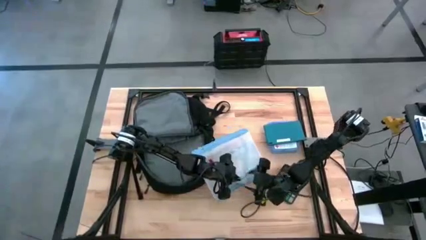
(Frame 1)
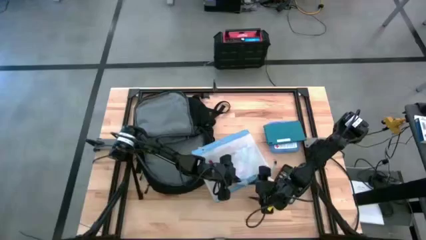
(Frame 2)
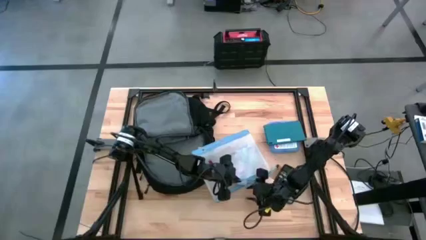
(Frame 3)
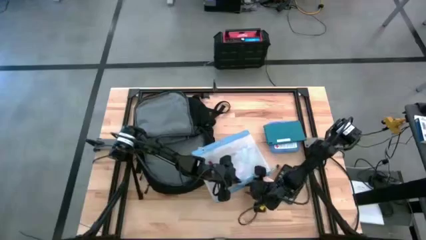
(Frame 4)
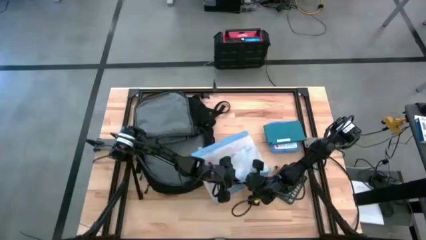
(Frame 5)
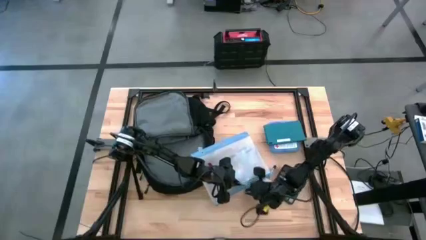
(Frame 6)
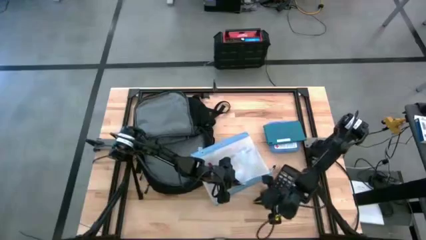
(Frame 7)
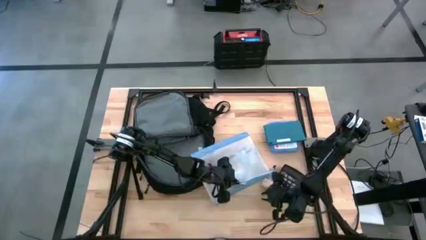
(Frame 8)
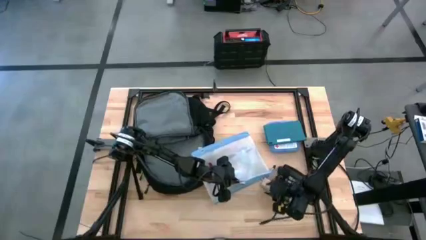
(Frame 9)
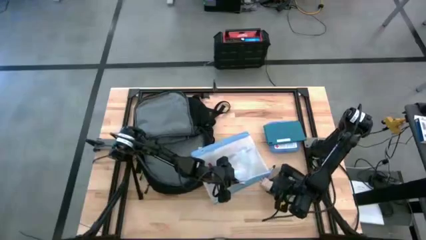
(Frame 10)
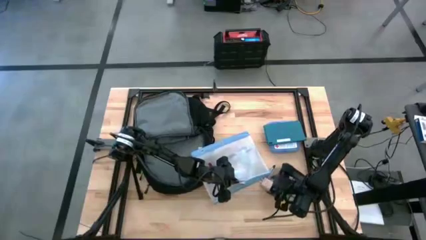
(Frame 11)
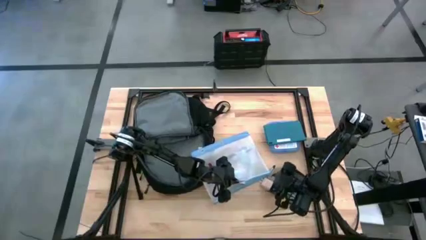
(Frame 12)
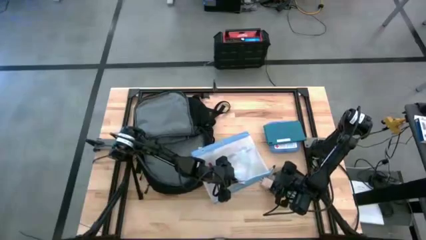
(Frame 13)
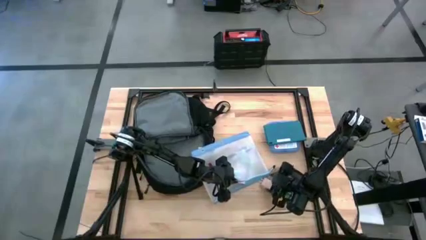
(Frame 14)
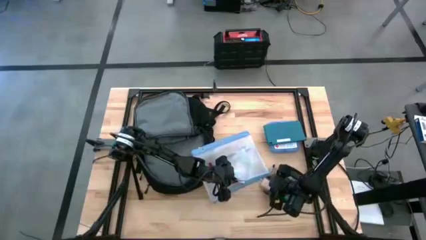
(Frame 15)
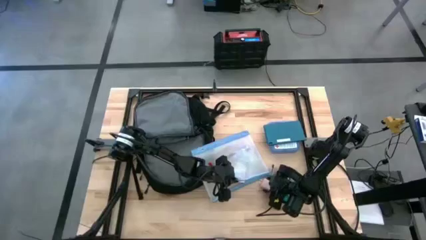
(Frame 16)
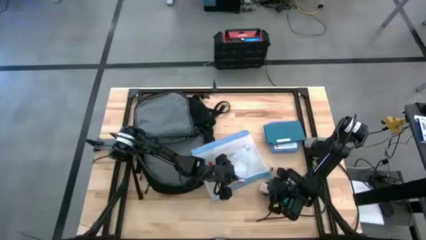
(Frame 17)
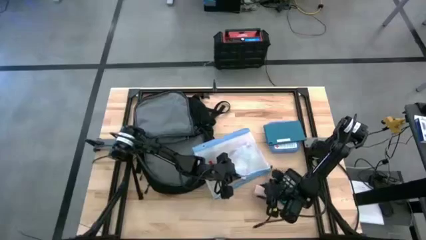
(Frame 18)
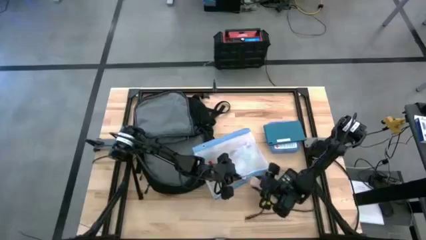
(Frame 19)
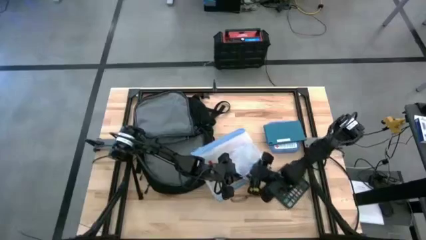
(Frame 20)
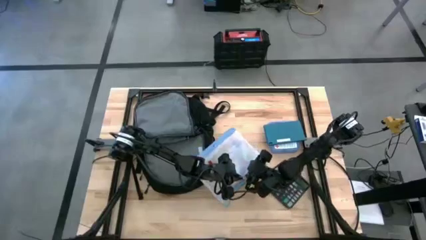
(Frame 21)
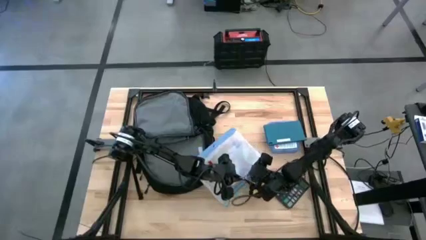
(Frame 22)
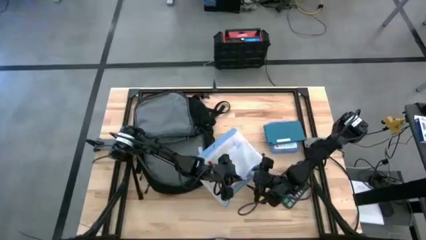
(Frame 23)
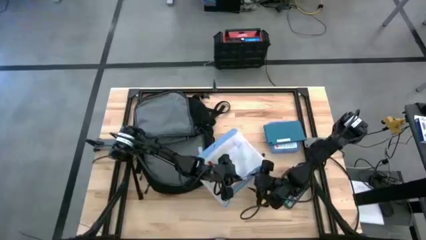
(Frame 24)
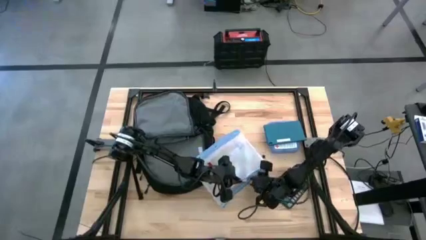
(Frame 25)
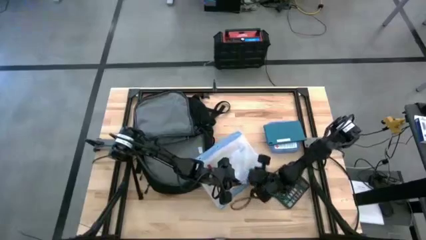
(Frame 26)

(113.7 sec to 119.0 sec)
Task: Unpack backpack
Put the pink charger adapter into the white mesh zipper pouch

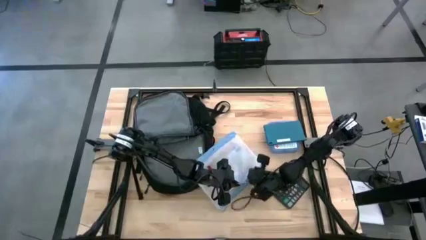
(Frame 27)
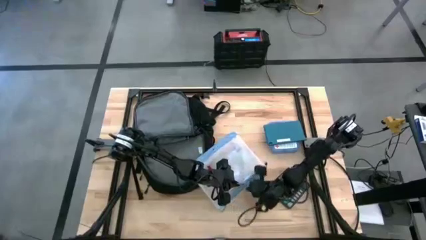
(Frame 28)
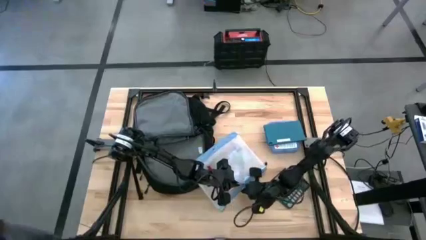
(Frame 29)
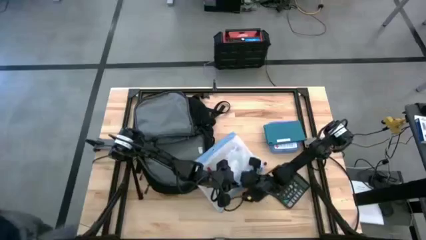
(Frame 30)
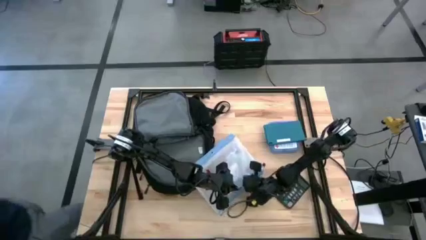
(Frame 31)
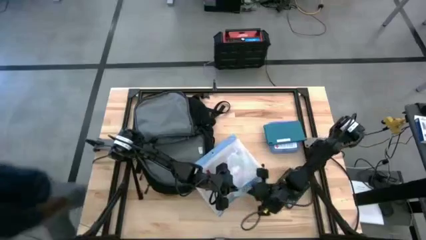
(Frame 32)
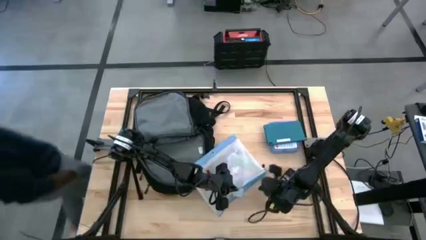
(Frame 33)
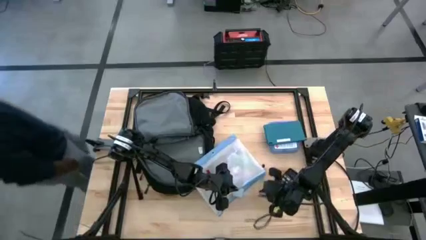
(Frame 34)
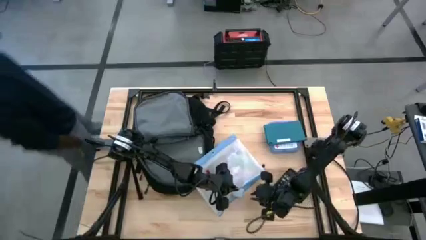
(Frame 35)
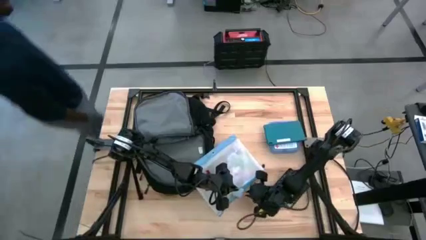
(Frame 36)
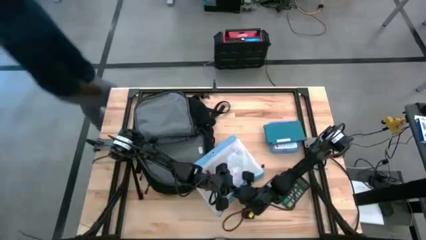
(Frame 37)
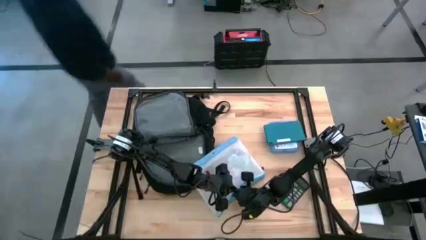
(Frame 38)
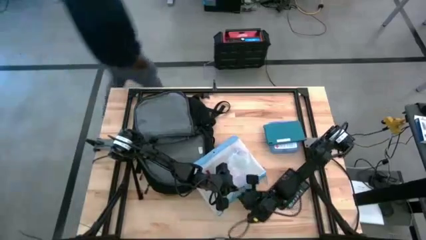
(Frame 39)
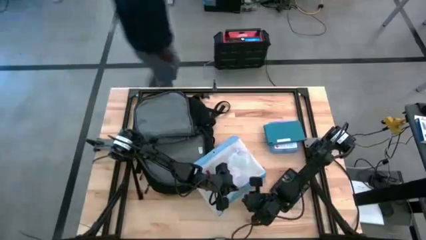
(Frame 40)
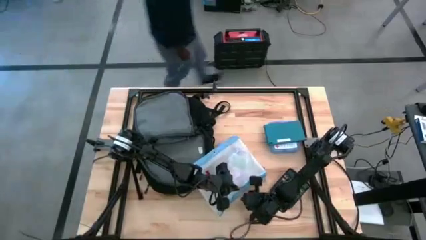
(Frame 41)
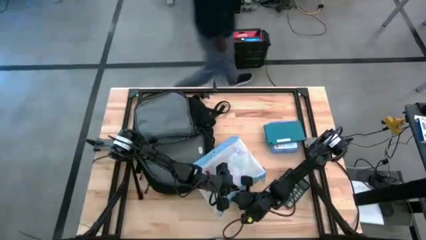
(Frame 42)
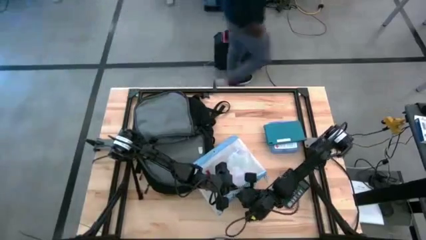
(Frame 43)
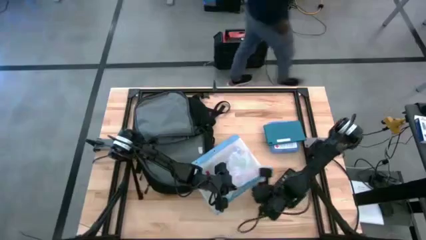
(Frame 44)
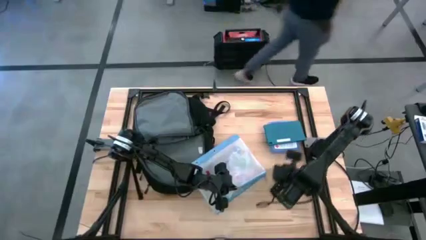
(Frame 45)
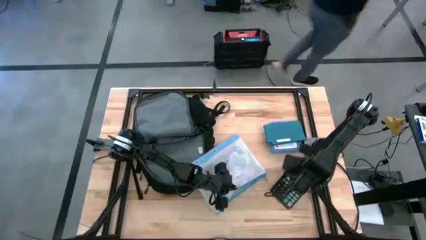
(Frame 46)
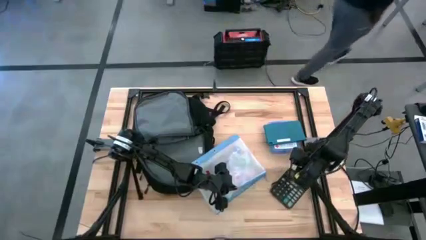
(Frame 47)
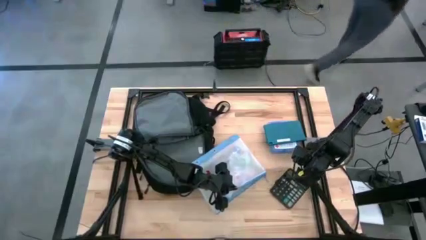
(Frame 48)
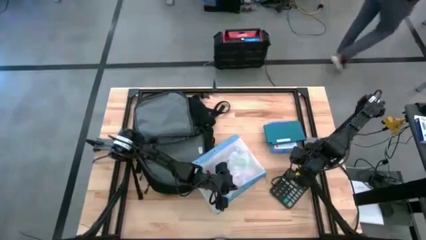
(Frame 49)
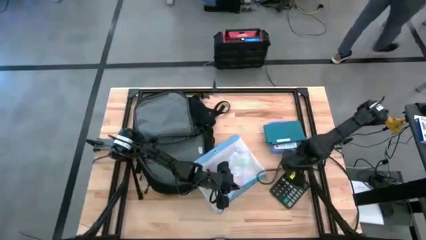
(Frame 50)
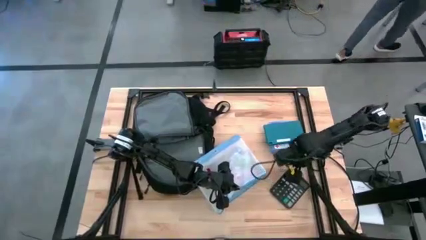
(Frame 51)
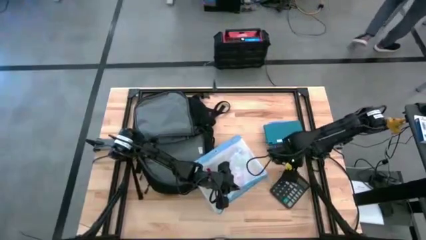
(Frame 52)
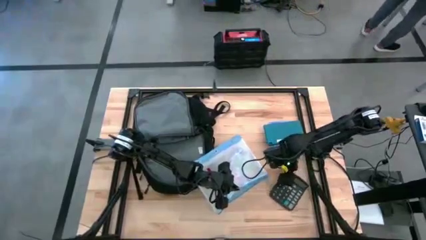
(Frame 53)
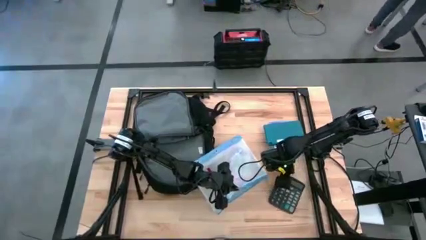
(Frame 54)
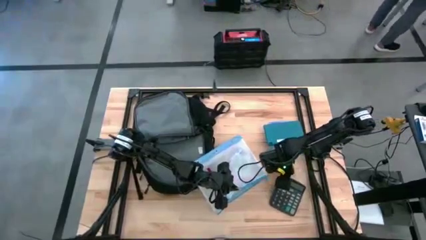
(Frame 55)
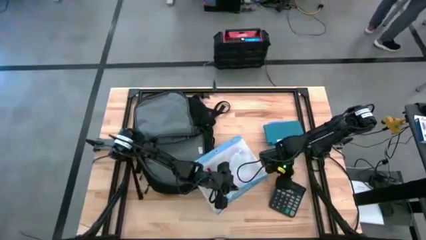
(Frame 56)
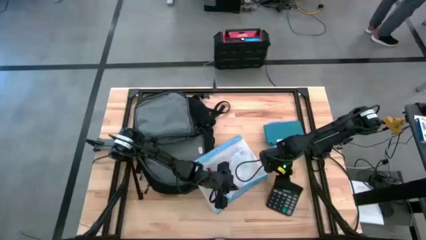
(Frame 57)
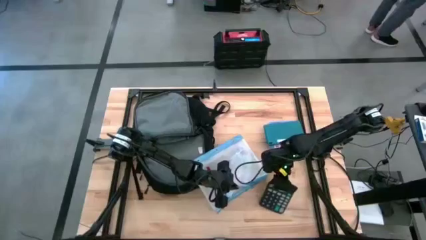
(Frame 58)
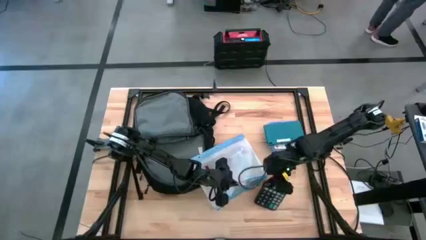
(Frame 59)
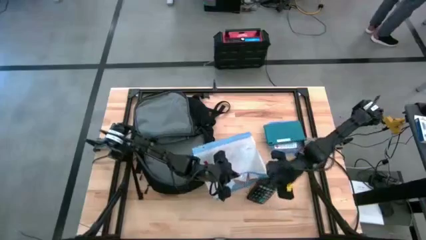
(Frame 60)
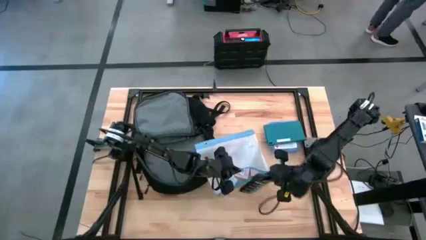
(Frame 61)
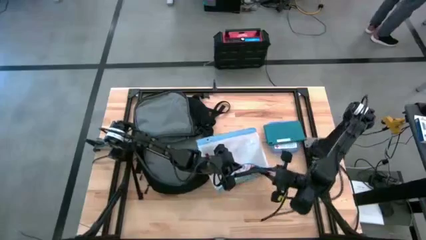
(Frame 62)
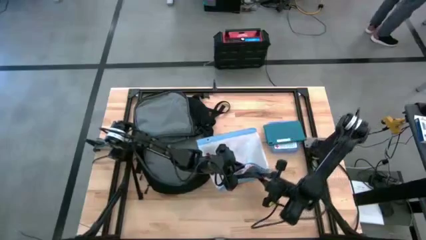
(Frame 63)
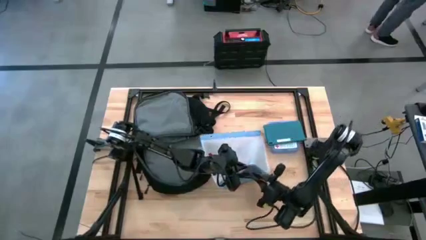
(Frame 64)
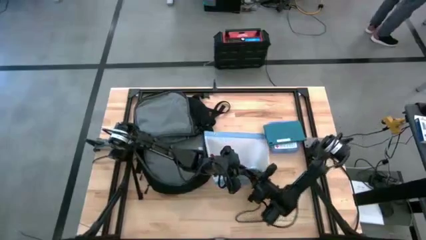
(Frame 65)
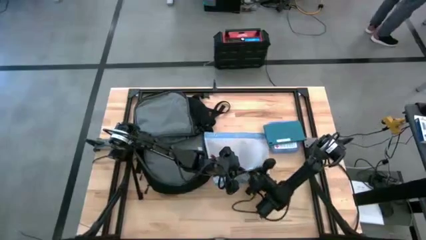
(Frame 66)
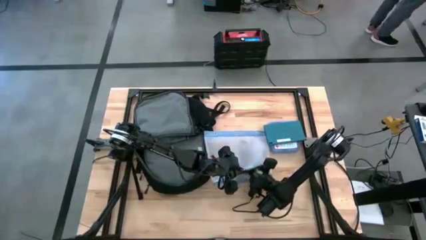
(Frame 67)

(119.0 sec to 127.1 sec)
Put the black calculator into the white mesh zipper pouch

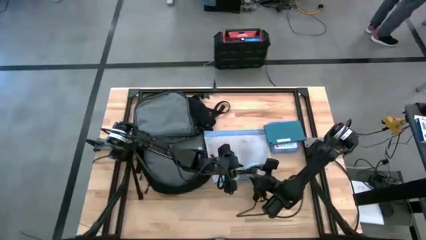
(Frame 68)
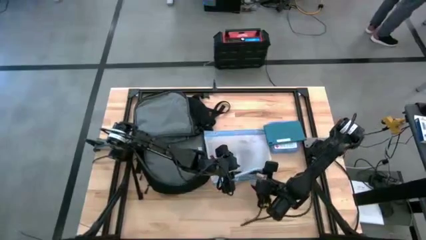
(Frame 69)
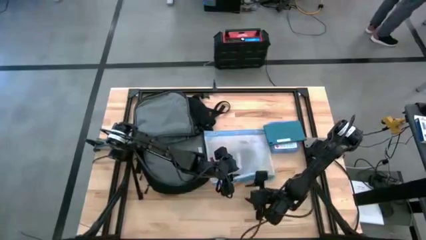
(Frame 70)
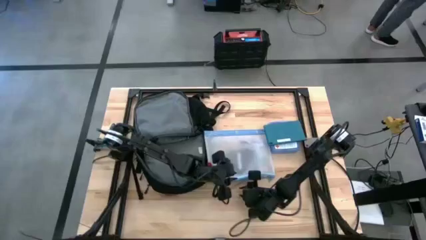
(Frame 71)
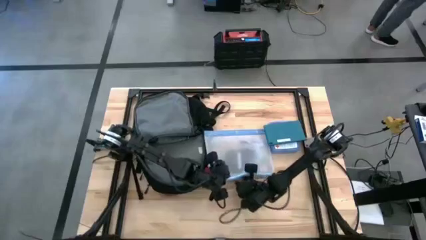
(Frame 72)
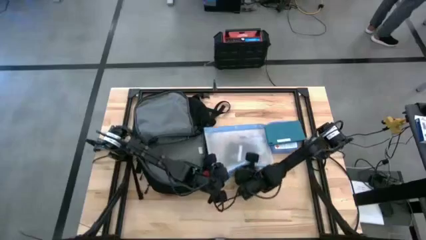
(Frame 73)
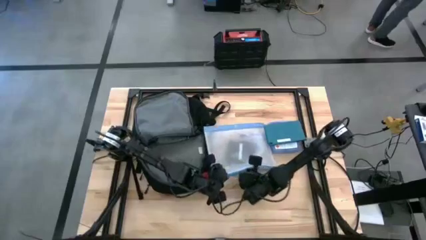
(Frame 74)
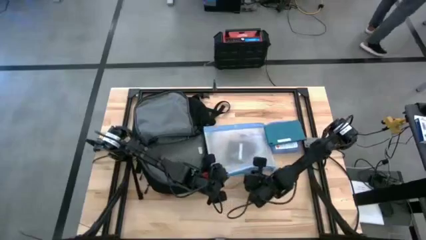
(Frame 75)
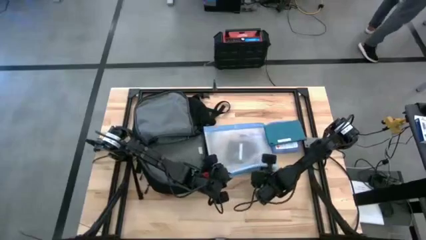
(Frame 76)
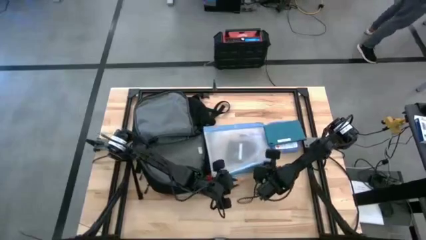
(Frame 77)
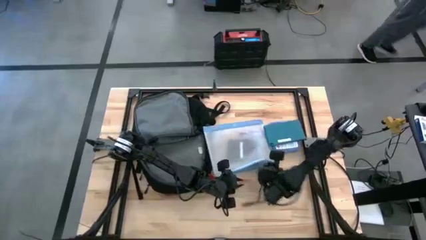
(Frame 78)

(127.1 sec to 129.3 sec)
Adjust the items in the white mesh zipper pouch

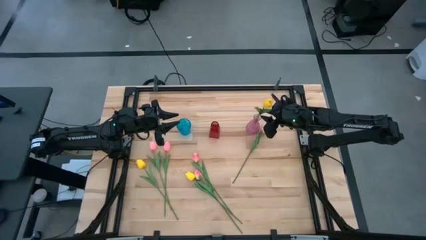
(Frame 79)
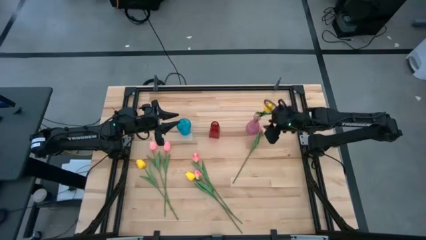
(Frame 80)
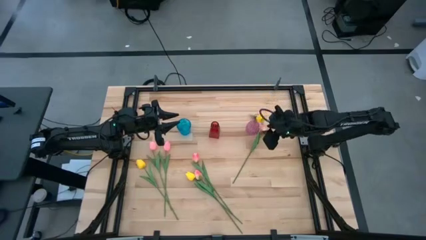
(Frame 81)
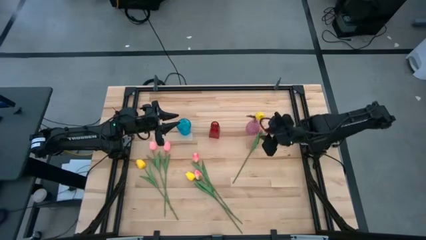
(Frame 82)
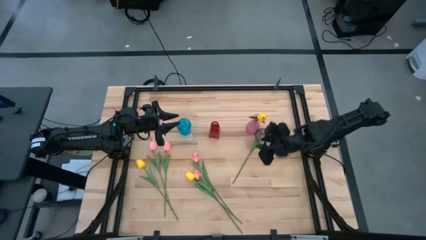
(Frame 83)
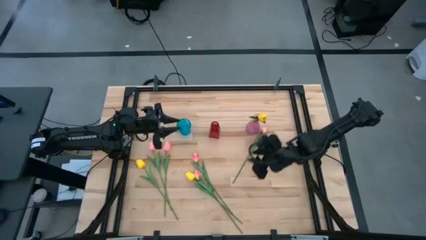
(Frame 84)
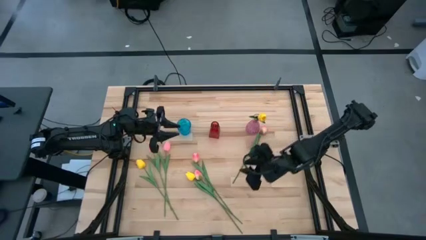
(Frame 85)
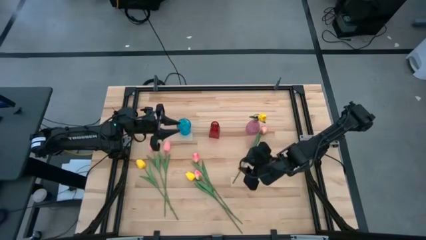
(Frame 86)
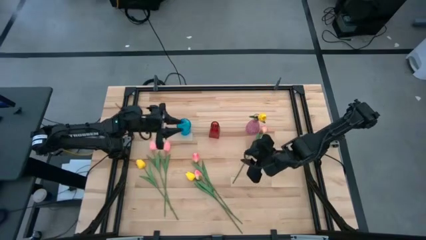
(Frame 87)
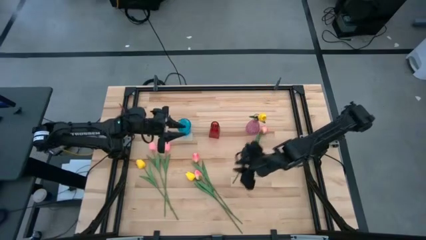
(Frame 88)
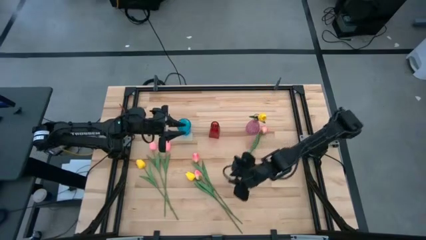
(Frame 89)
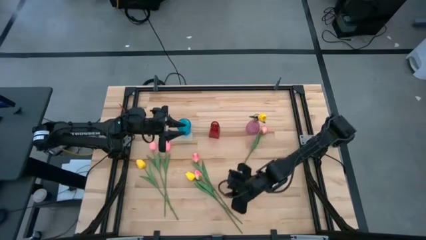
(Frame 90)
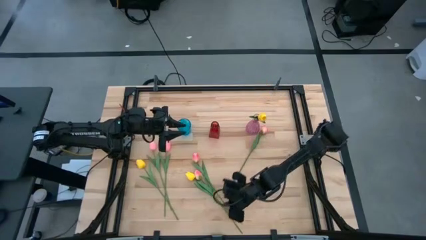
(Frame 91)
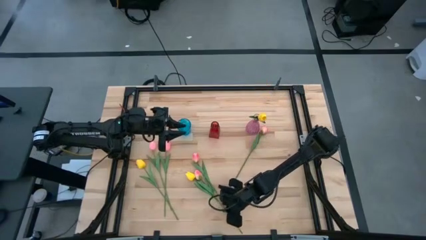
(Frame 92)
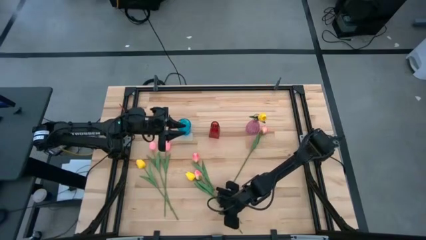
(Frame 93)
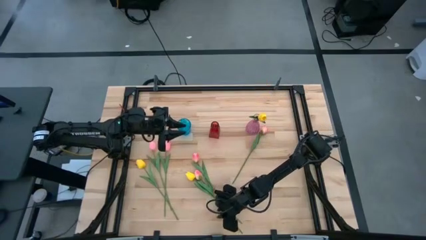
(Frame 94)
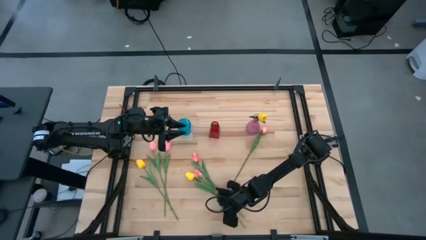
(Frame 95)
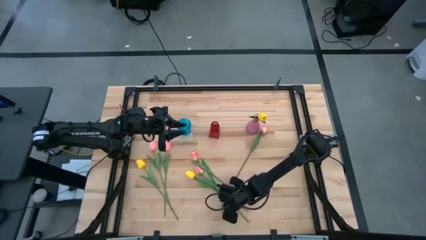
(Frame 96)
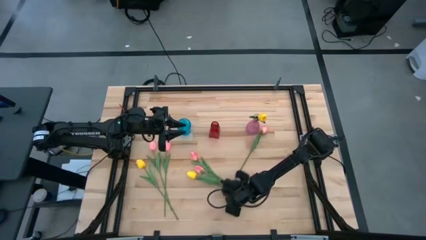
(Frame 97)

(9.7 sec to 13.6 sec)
Task: Sort flowers into vase by color
Adjust the flowers
